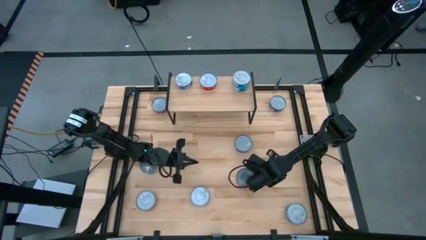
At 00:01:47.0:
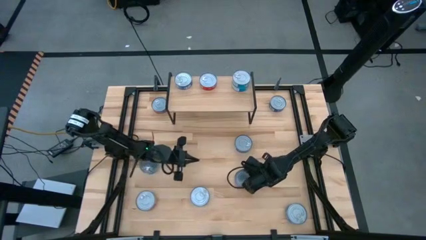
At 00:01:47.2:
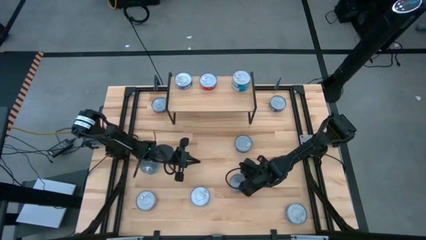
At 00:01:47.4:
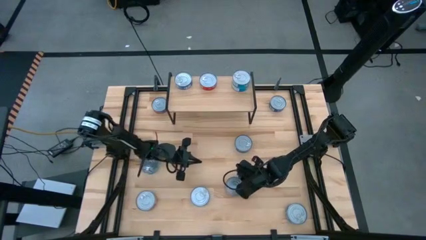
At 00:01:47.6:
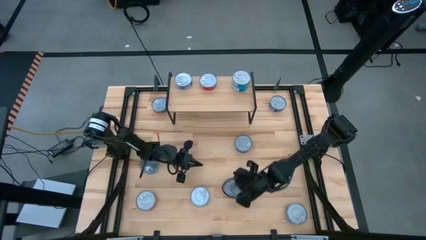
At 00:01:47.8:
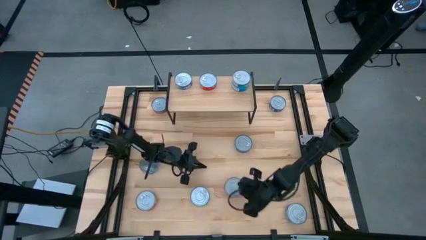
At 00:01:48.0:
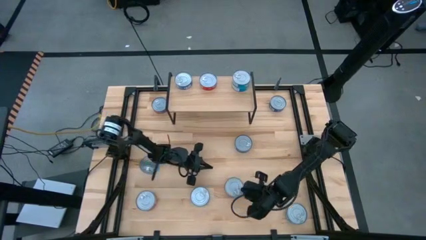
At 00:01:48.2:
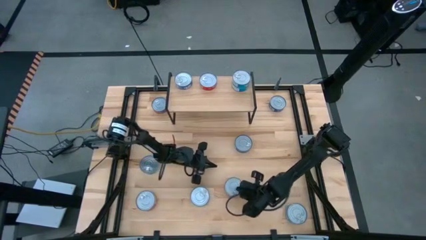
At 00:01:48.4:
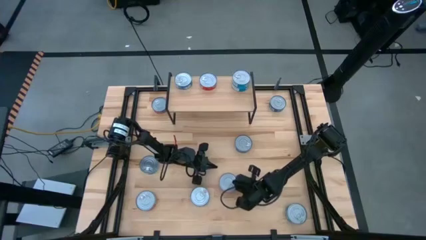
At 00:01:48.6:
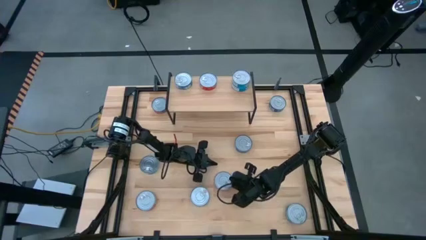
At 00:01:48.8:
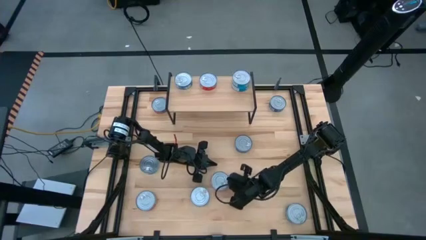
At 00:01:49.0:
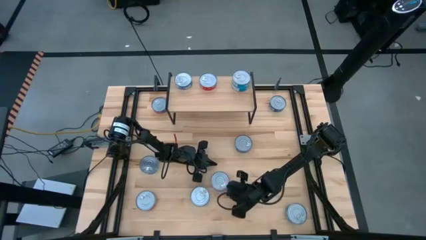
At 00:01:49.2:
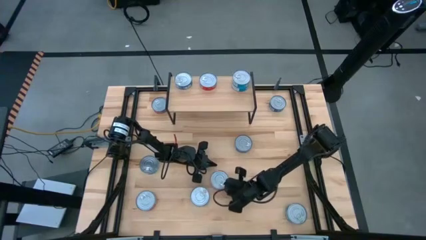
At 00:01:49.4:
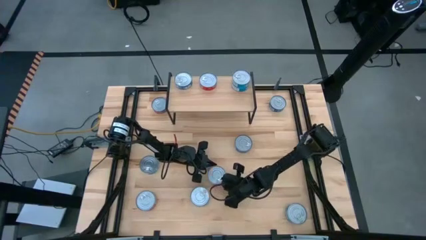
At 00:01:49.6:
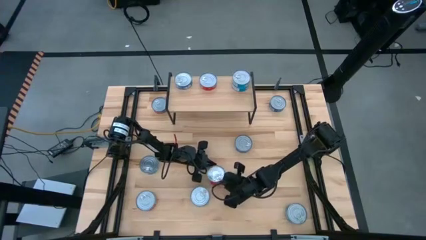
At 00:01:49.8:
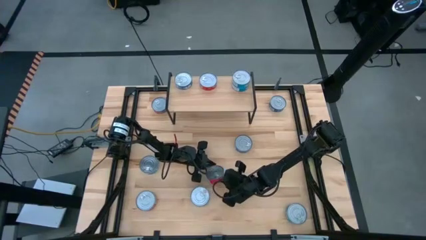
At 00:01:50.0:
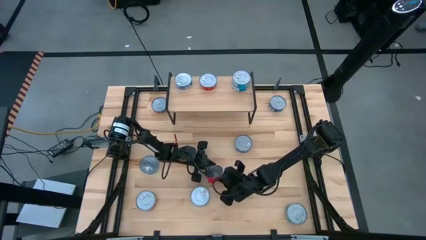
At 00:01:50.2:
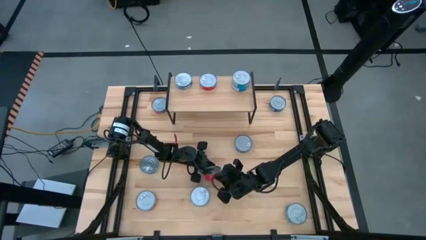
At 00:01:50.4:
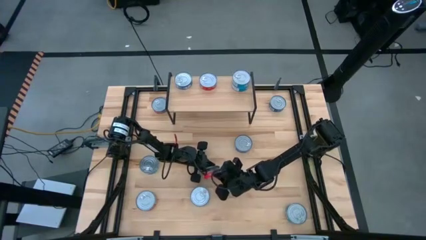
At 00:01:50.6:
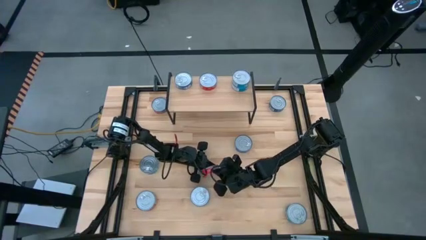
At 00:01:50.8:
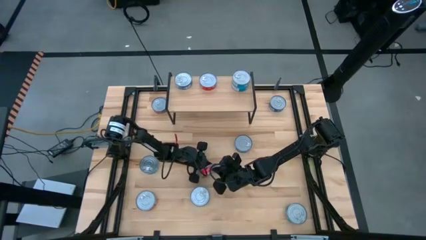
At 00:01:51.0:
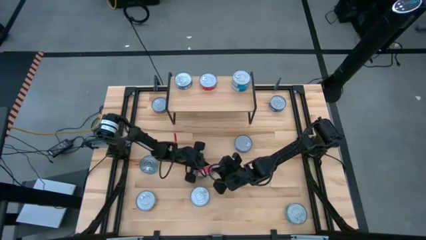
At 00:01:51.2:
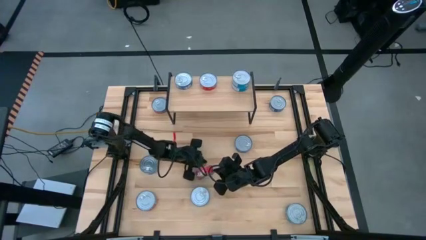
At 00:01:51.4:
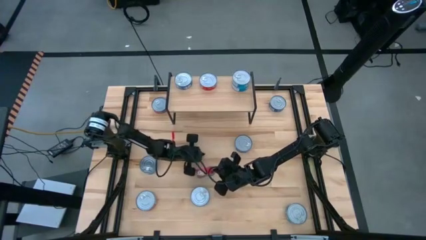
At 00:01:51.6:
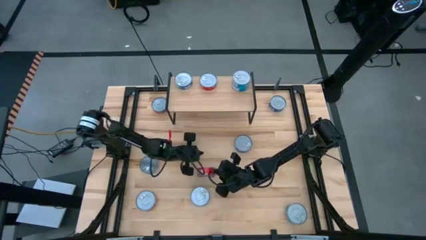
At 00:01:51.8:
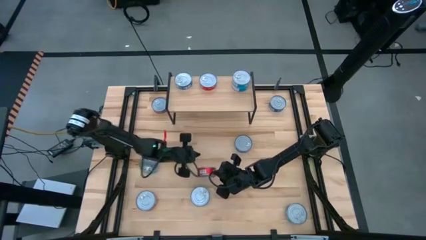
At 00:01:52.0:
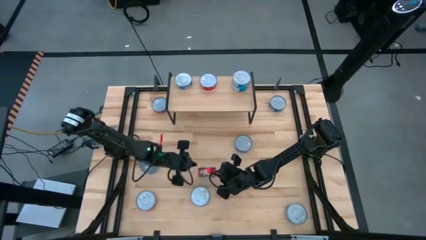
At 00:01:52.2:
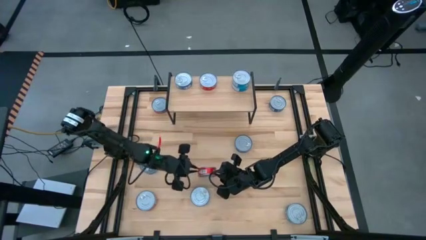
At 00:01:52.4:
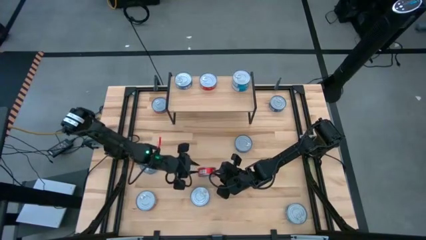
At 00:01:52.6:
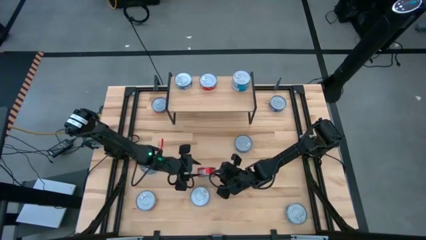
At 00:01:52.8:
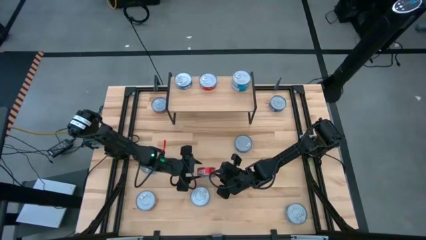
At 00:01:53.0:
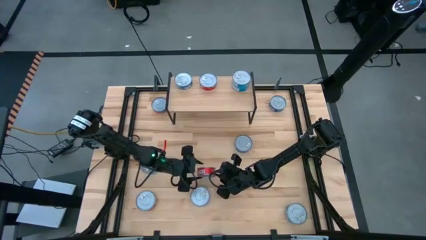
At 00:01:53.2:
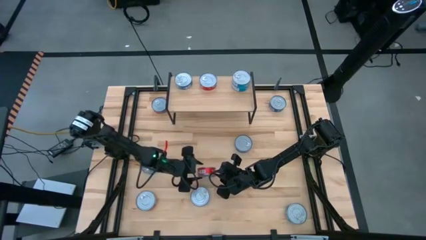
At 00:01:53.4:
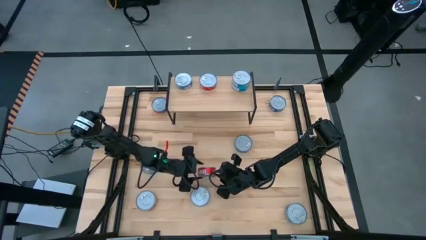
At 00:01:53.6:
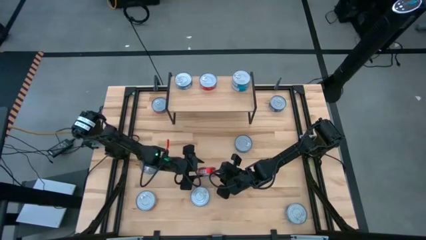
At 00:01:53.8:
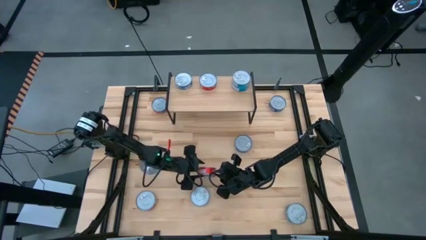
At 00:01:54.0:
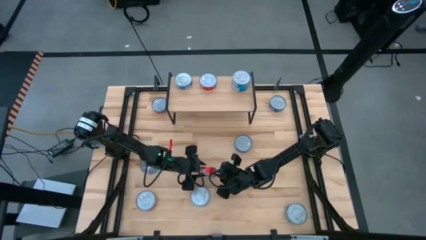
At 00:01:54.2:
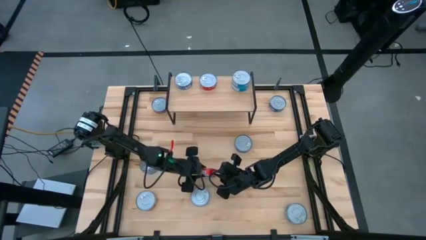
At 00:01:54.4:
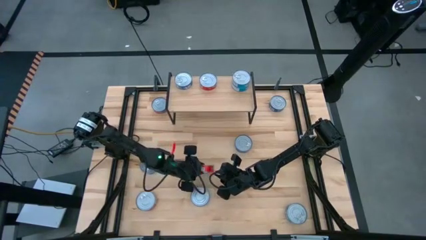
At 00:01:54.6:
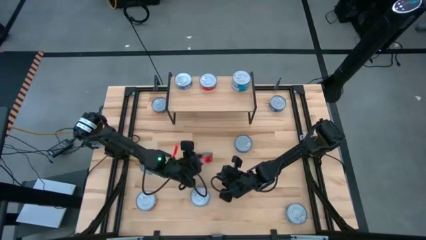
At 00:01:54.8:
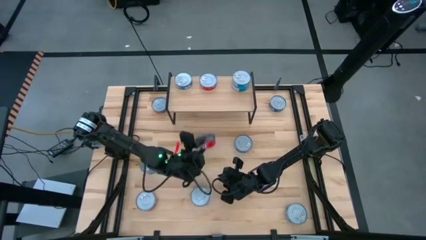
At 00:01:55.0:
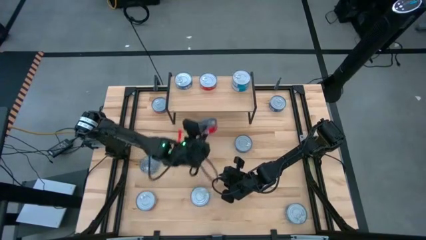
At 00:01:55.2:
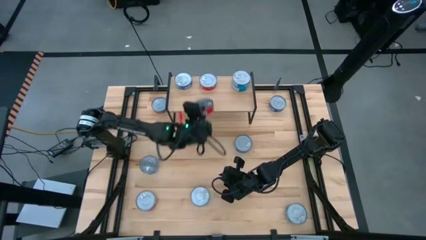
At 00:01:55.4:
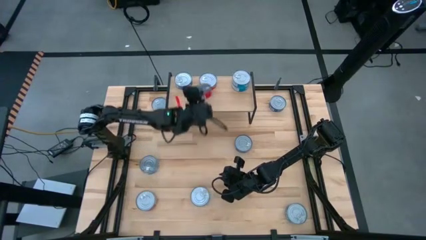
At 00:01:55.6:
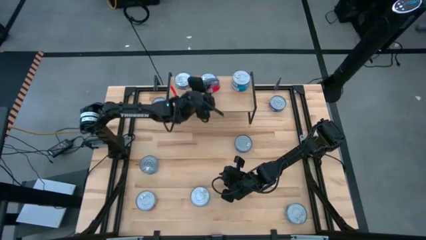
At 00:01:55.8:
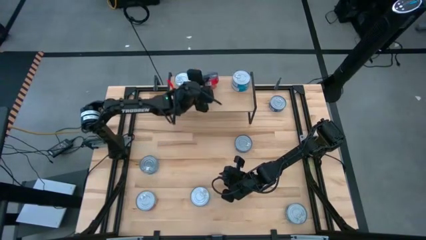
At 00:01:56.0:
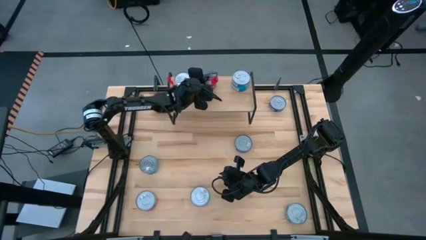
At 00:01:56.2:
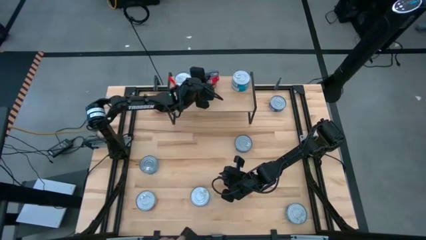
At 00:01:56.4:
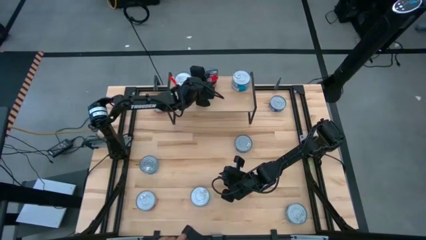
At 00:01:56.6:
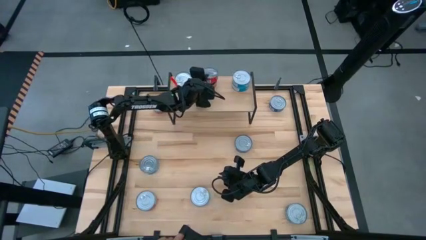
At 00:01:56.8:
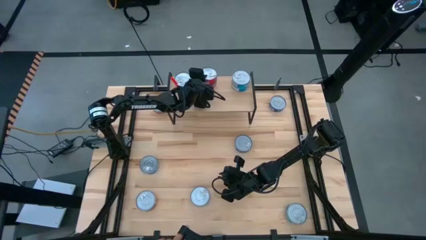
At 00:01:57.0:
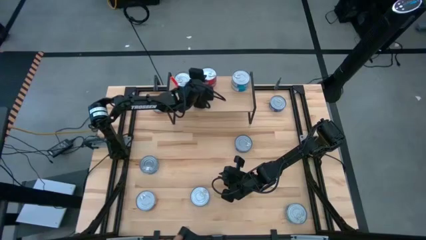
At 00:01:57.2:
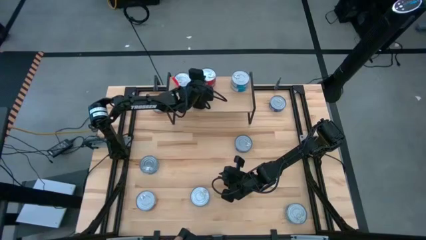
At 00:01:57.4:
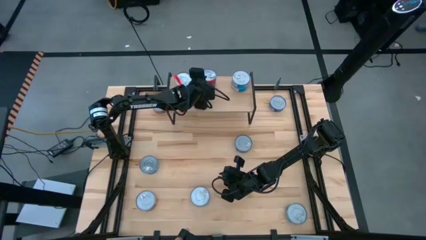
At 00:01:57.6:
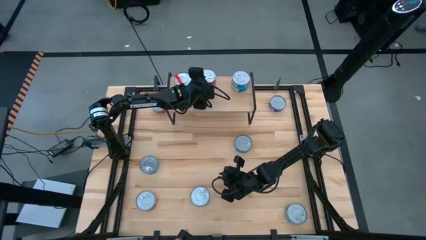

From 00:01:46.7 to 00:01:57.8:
Task: Stack canned seafood by type on shelf
Stack the red tuna can on top of the red tuna can on the shelf
